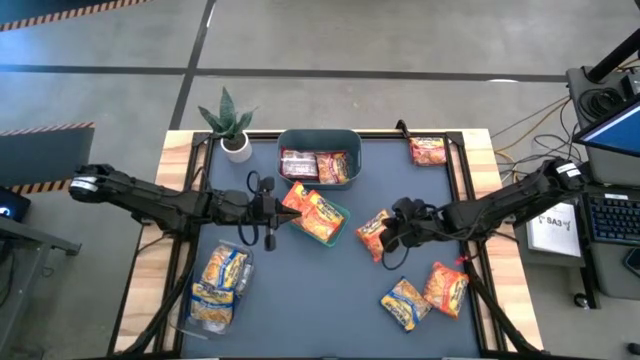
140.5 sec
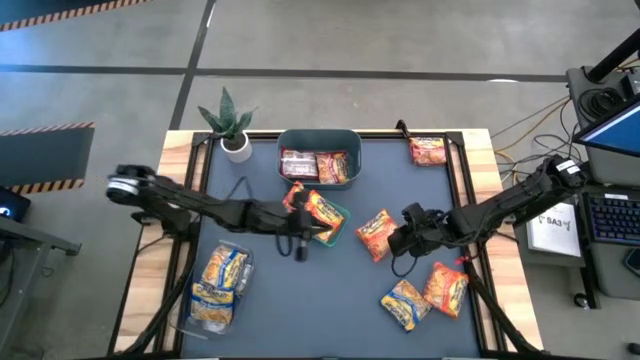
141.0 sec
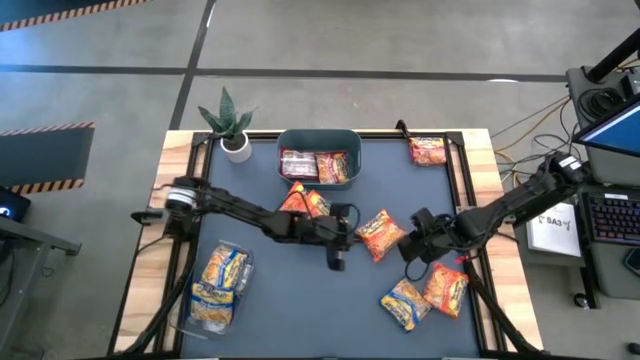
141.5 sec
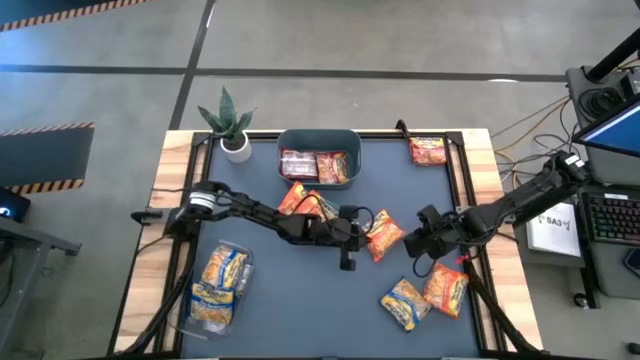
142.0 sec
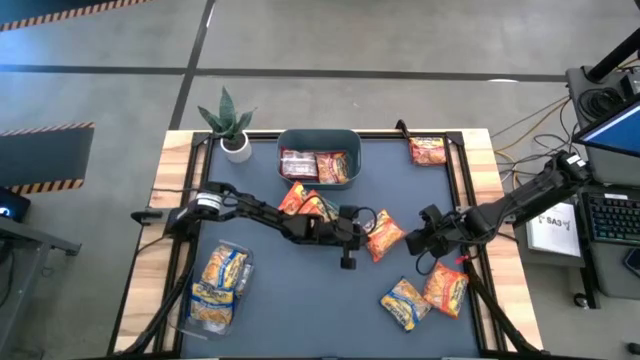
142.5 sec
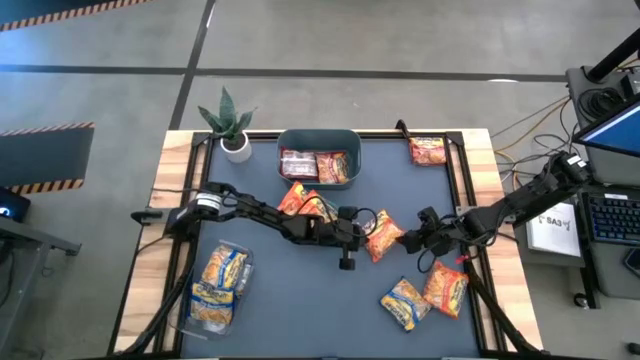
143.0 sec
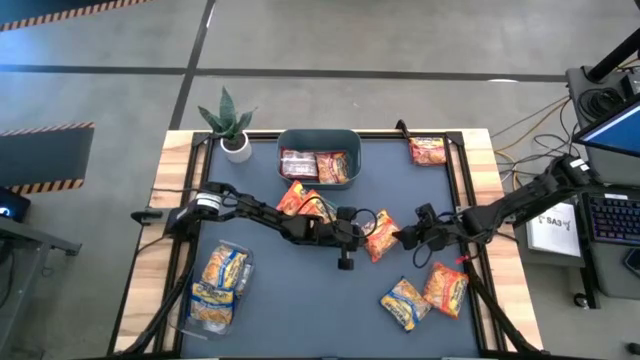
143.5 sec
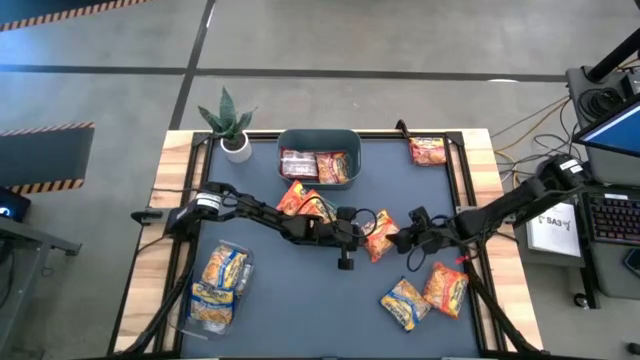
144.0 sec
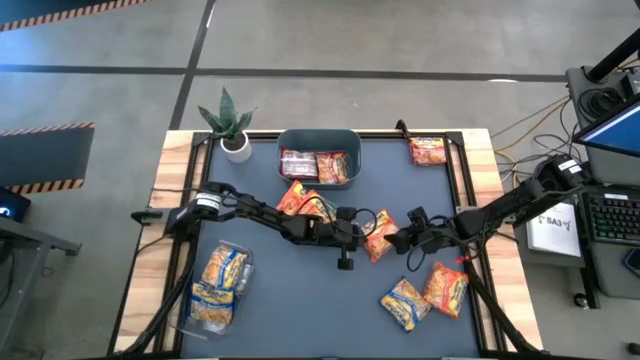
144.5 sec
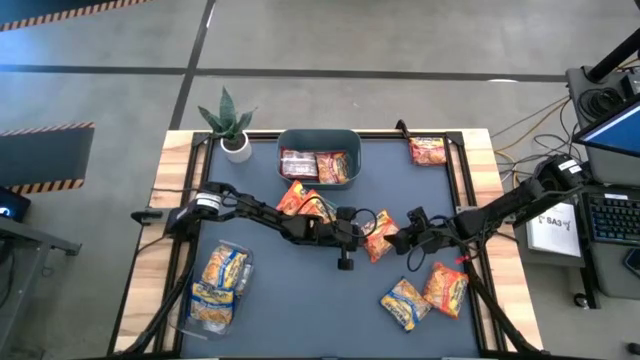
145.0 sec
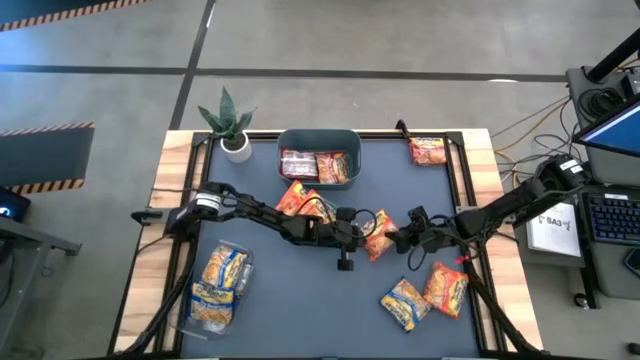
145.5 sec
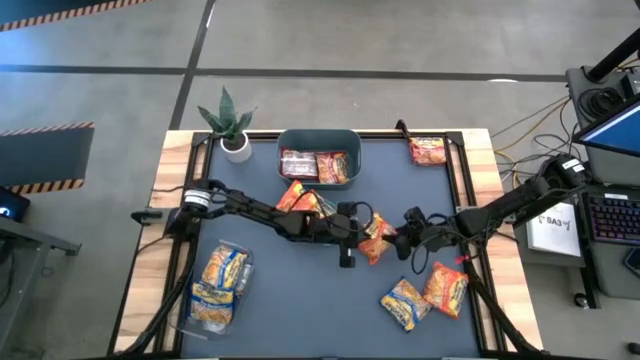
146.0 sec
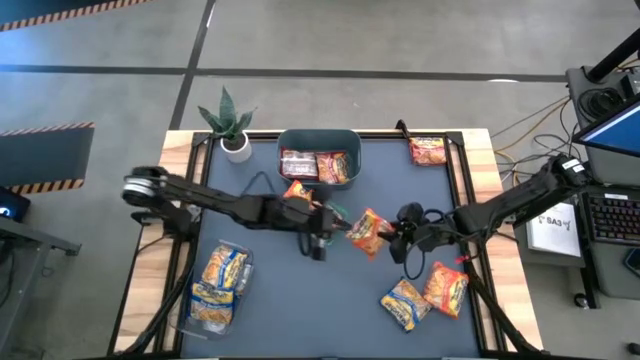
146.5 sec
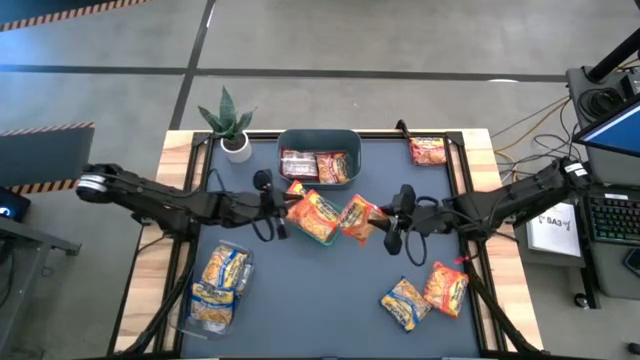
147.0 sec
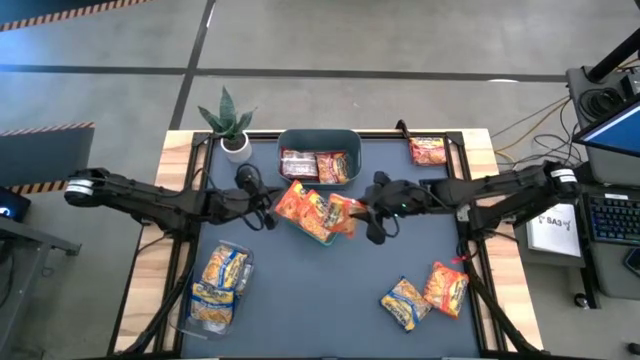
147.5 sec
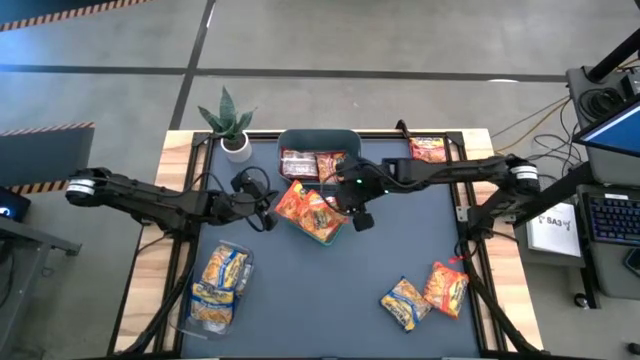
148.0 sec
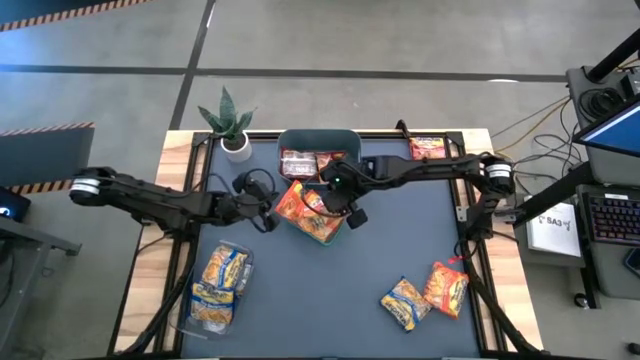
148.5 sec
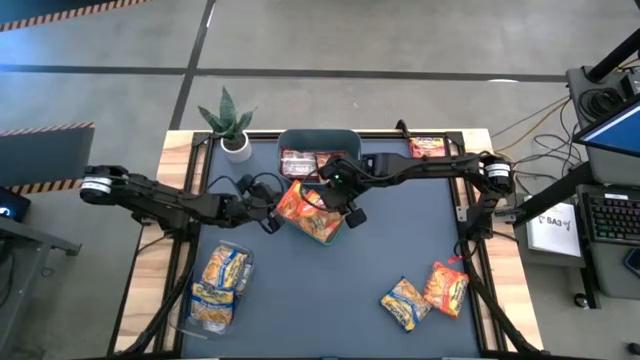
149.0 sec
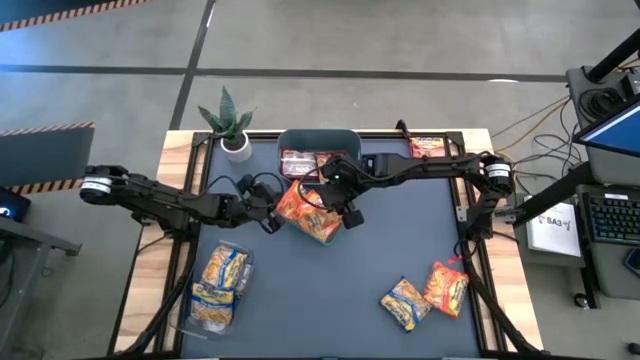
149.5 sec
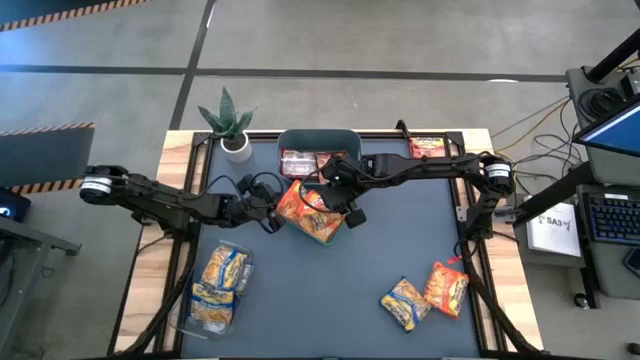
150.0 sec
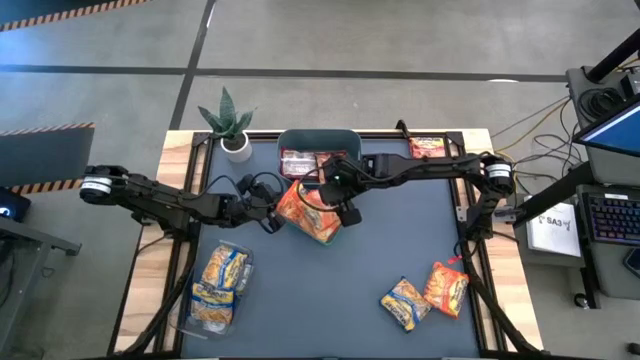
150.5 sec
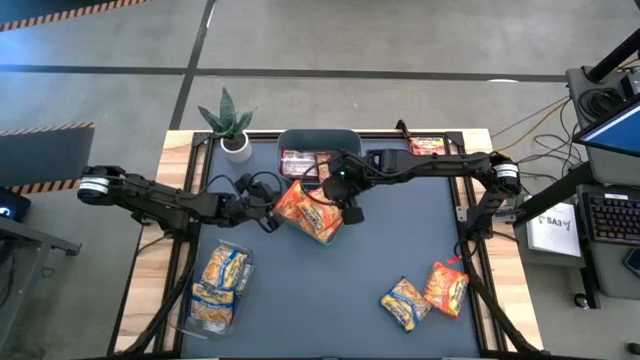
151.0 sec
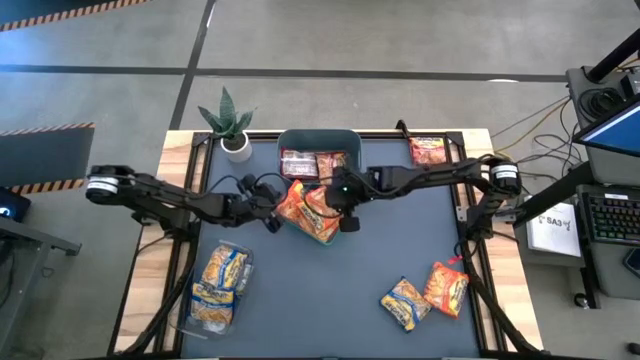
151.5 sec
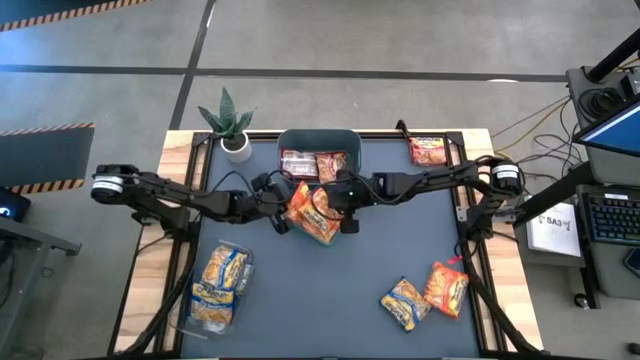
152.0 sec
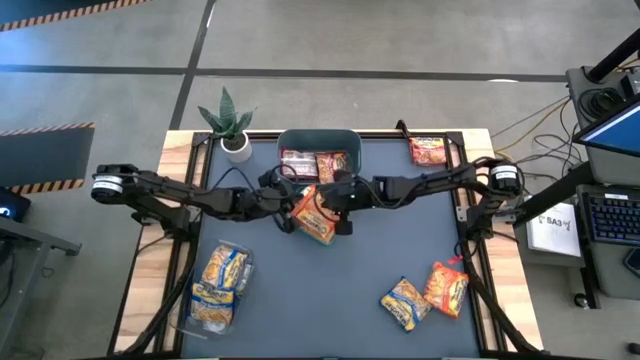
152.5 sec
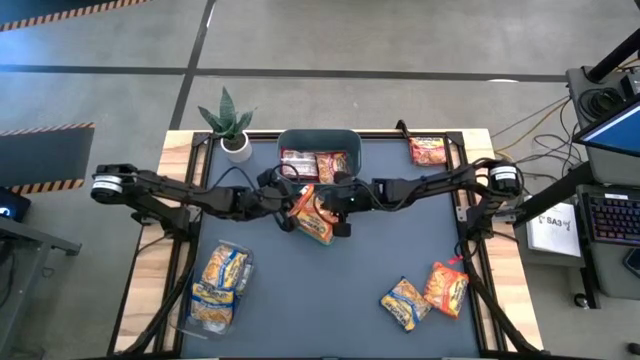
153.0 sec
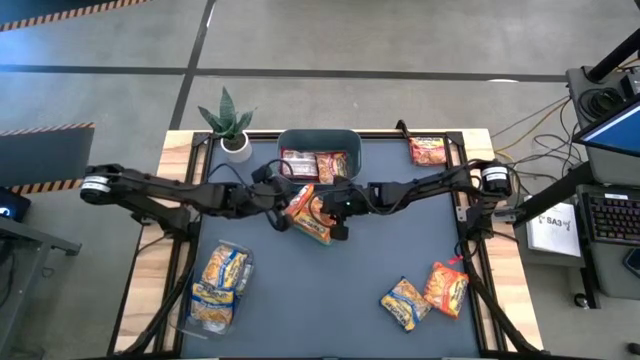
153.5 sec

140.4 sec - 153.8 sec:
Task: Sort Maruchan noodles
Put the orange noodle pack into the green bin

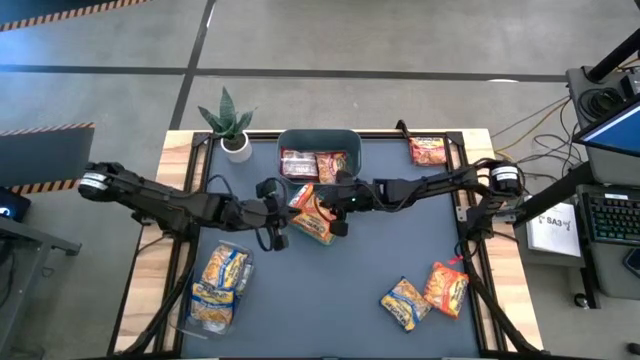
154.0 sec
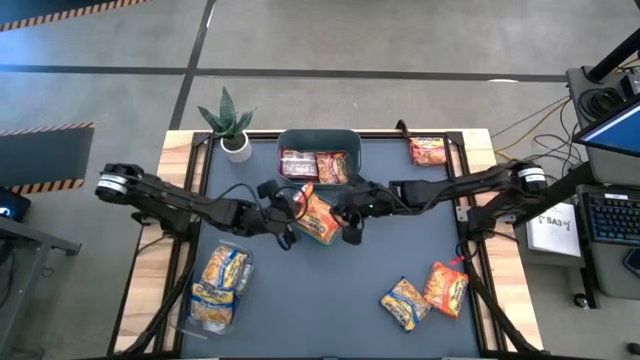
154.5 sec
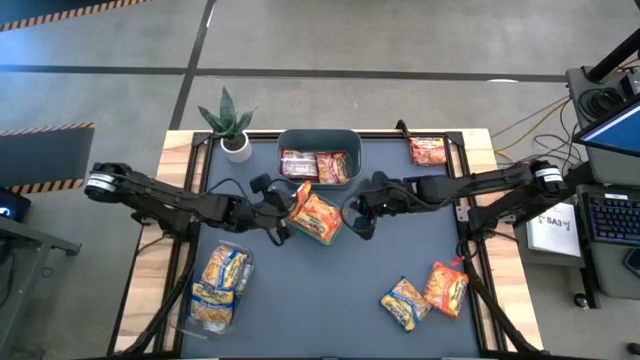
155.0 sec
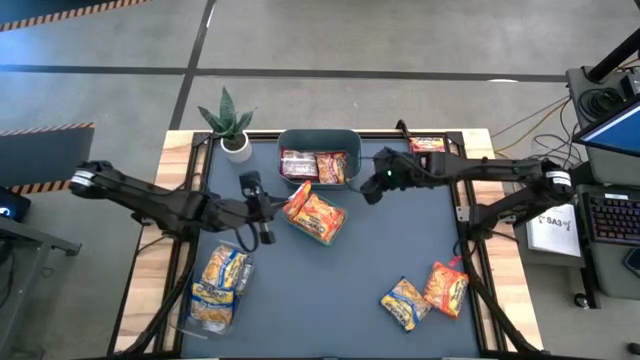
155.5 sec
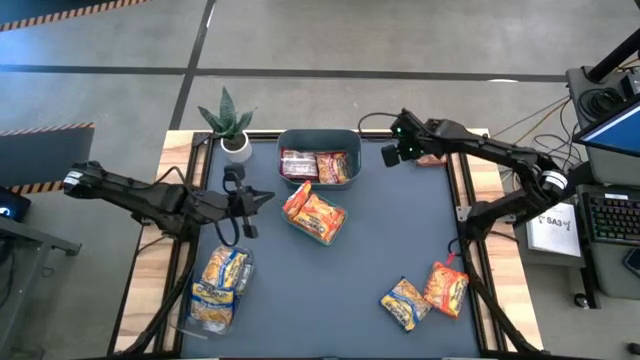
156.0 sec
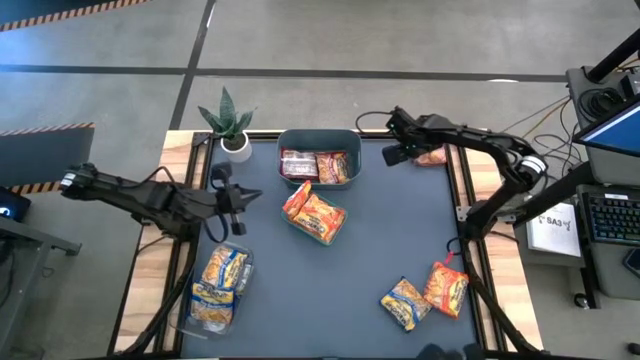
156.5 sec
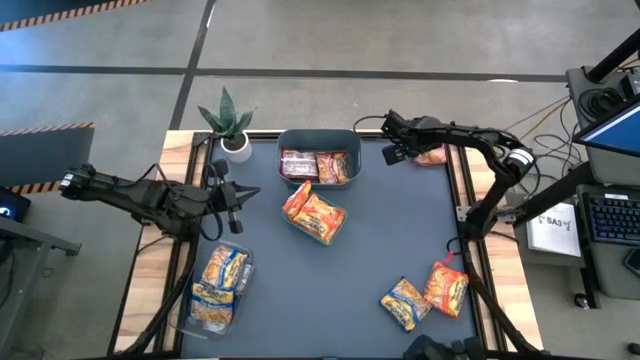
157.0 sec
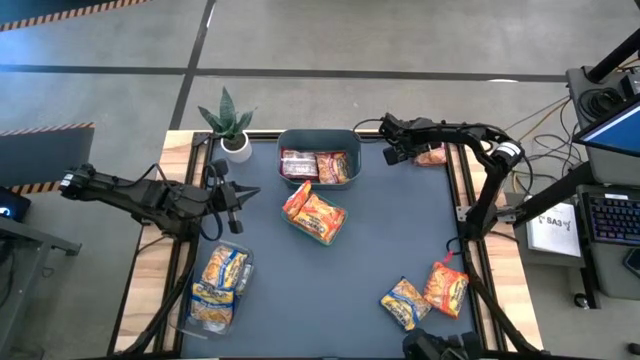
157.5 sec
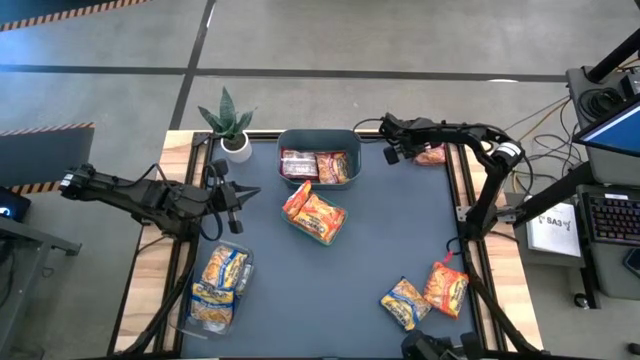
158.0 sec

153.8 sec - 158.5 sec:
Put the red noodle pack into the blue bin

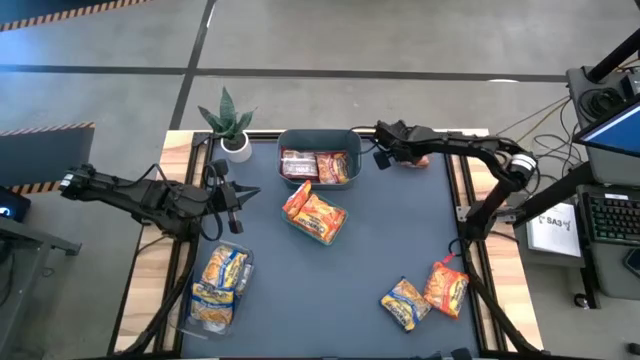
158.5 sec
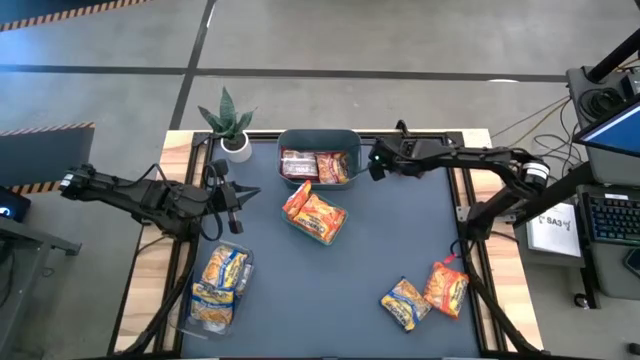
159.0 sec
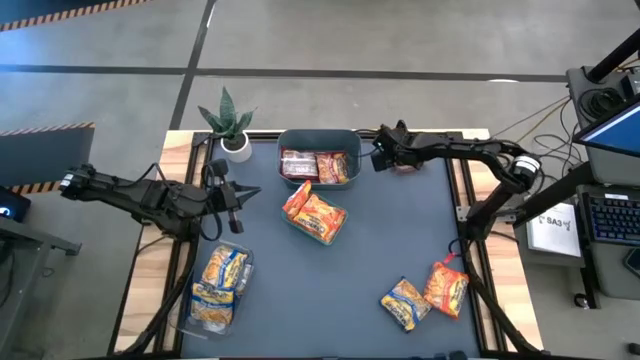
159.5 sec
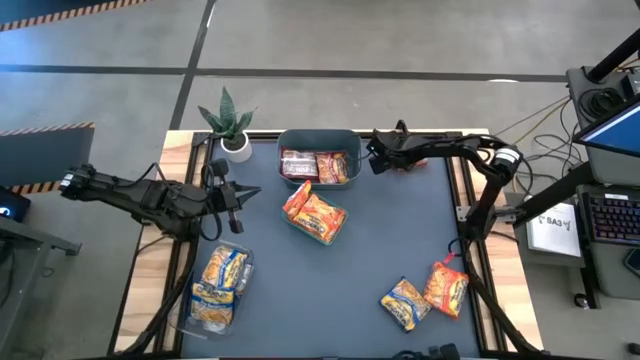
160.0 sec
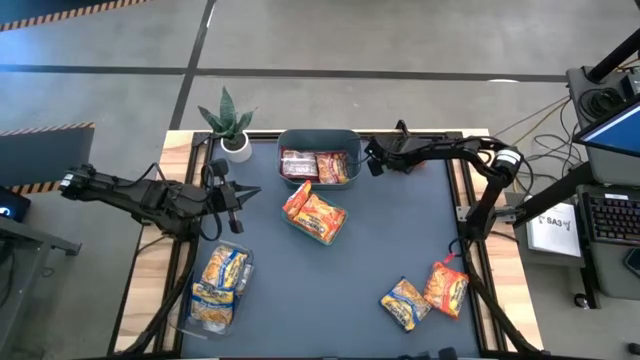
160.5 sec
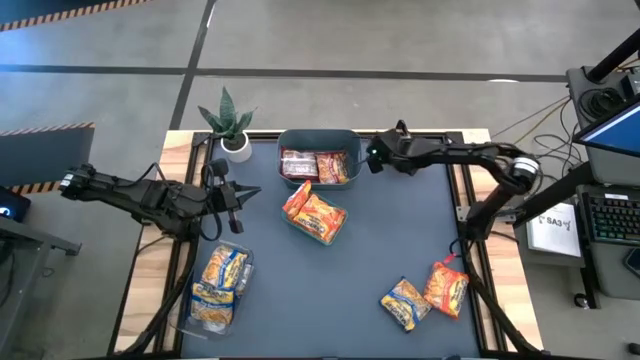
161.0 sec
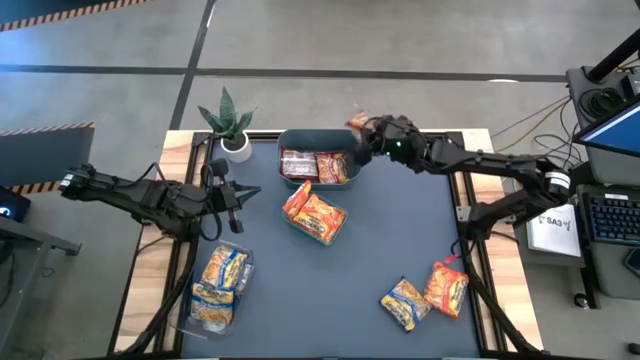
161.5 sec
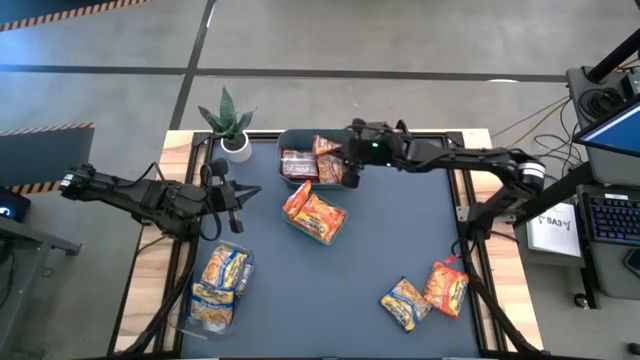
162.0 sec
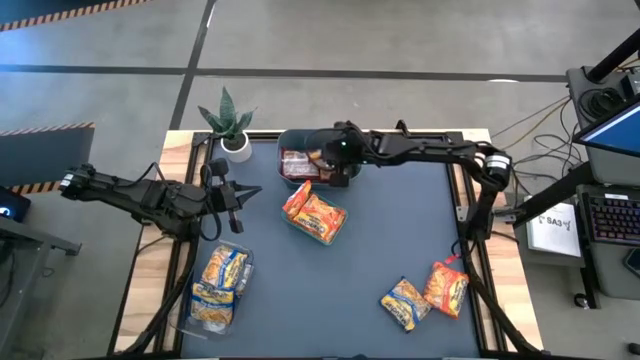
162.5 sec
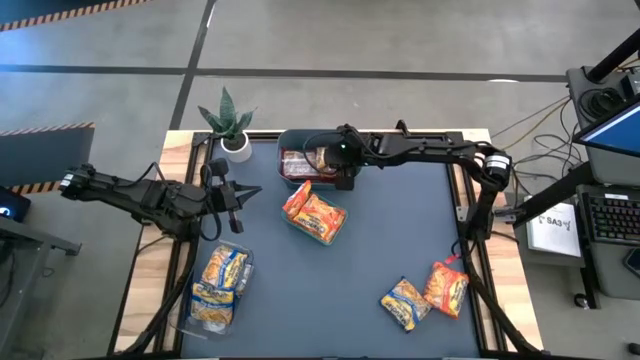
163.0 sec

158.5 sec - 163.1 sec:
Put the red noodle pack into the blue bin
